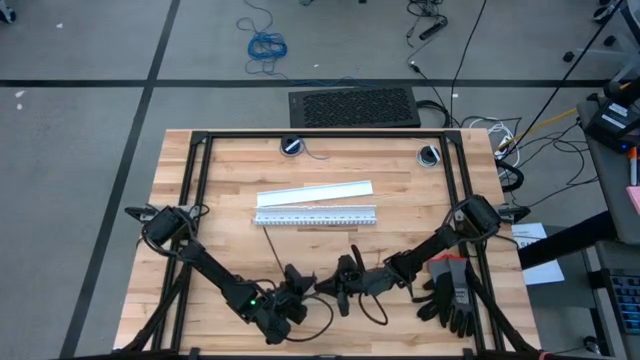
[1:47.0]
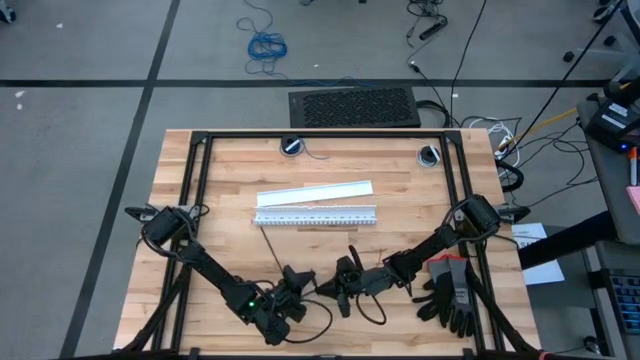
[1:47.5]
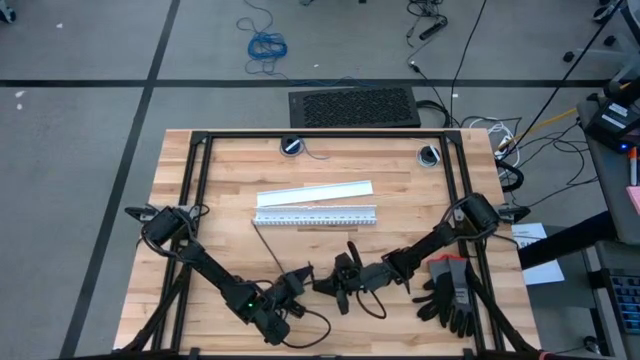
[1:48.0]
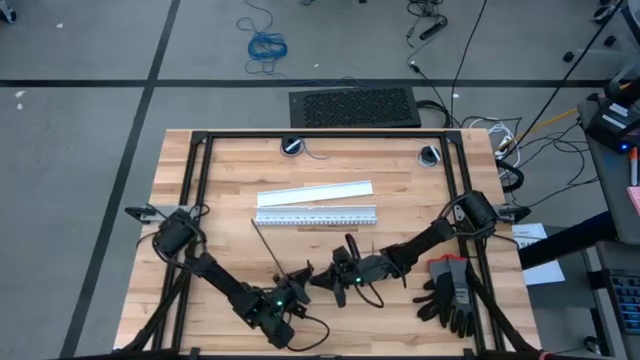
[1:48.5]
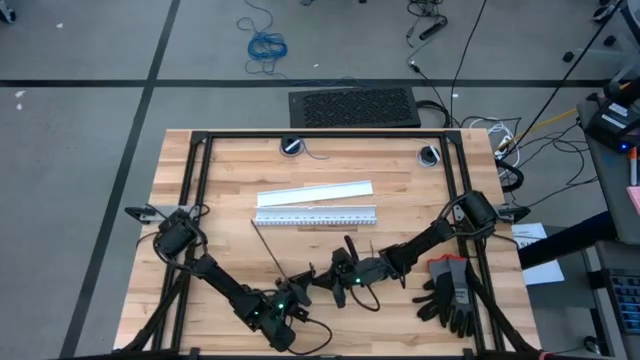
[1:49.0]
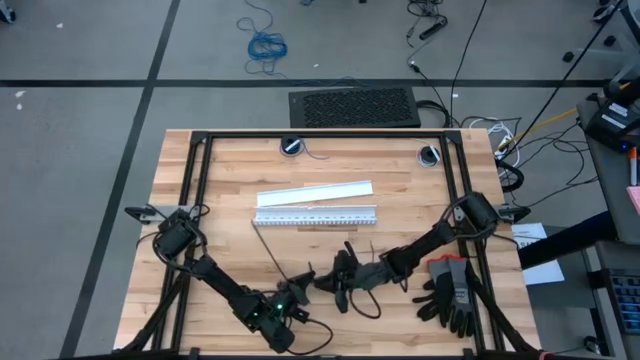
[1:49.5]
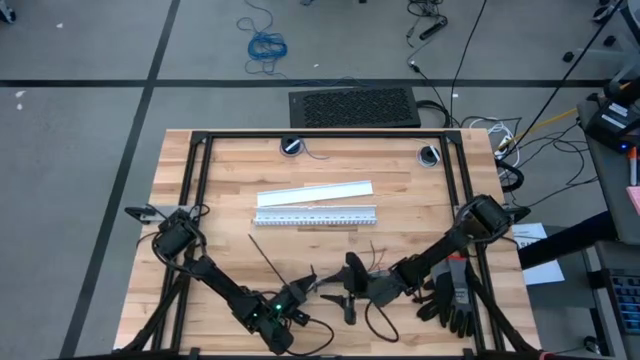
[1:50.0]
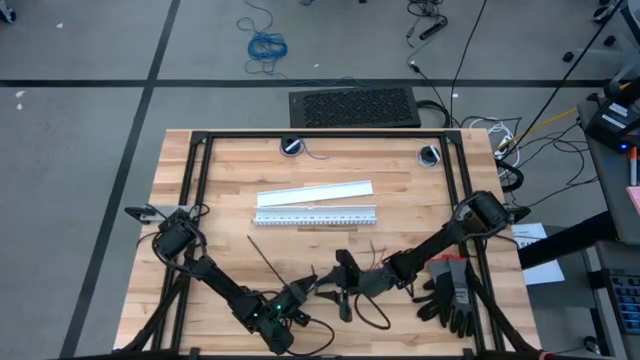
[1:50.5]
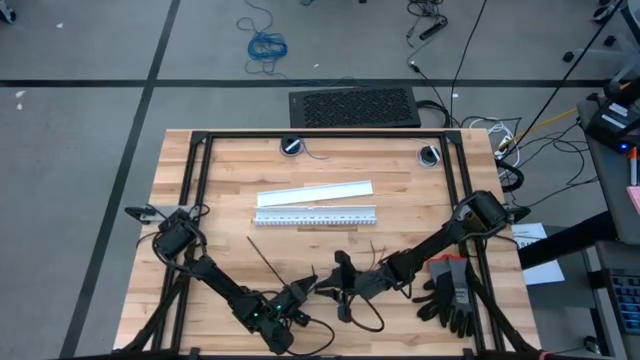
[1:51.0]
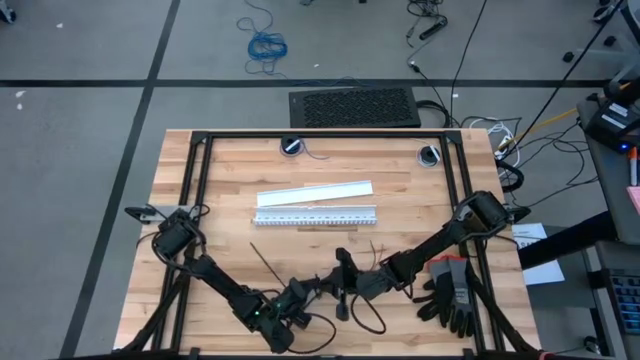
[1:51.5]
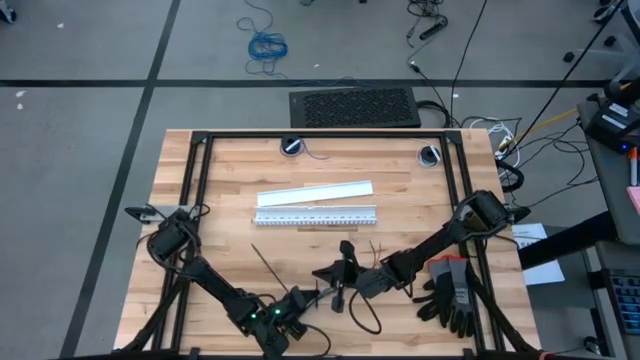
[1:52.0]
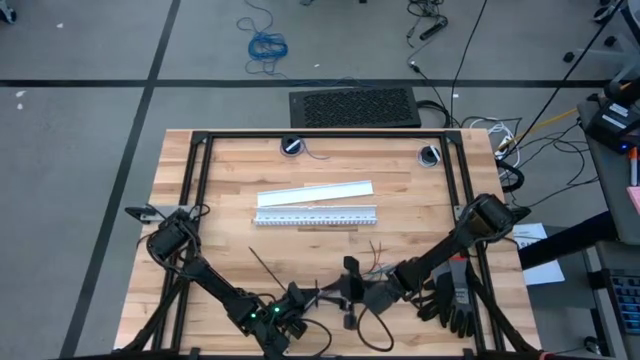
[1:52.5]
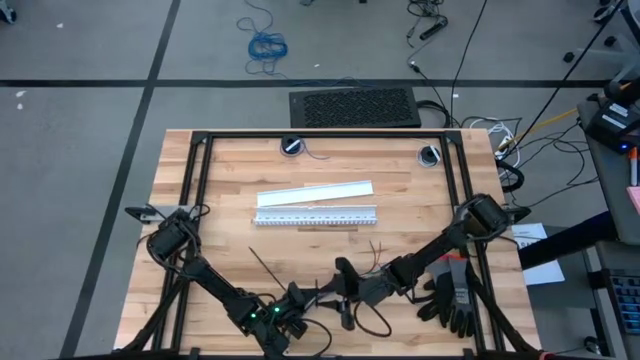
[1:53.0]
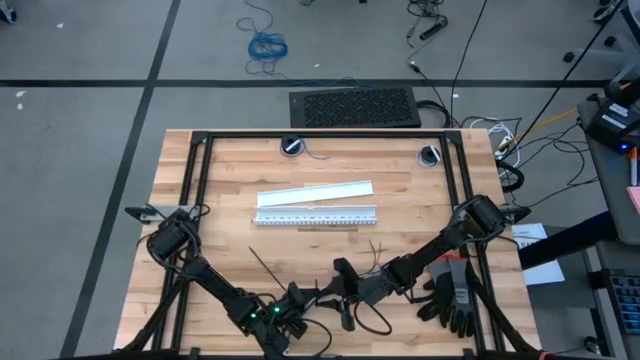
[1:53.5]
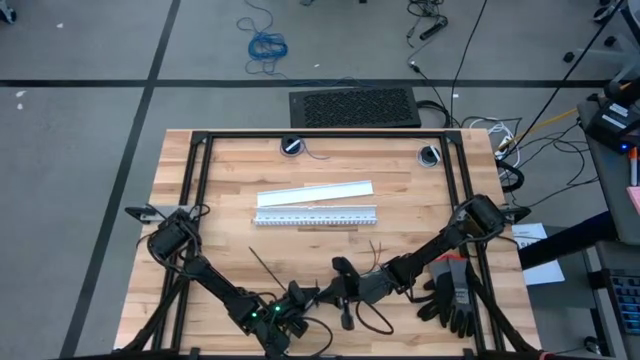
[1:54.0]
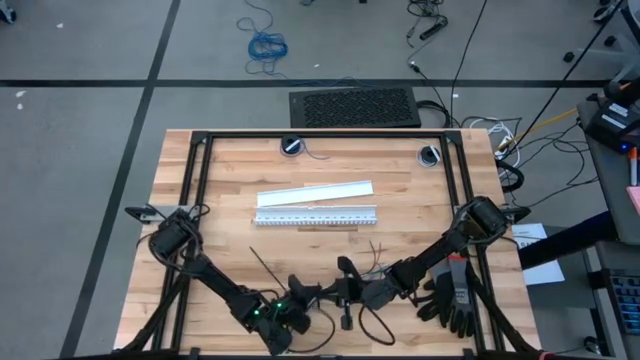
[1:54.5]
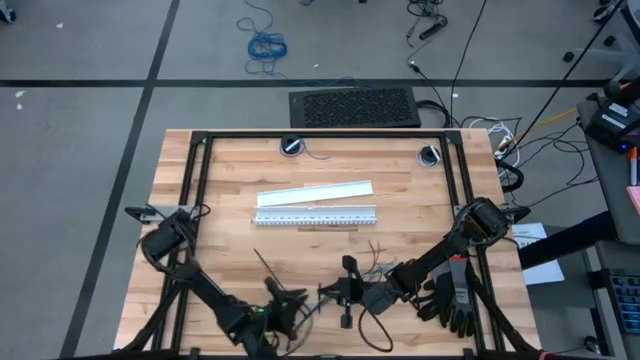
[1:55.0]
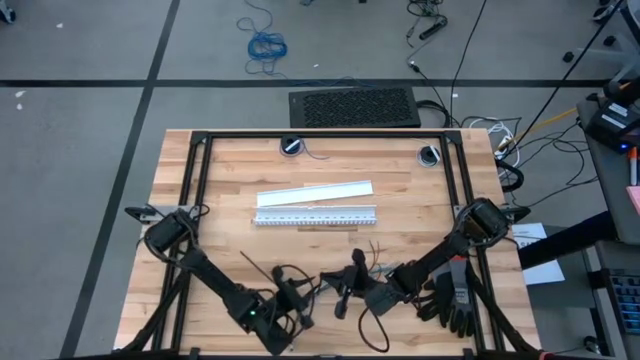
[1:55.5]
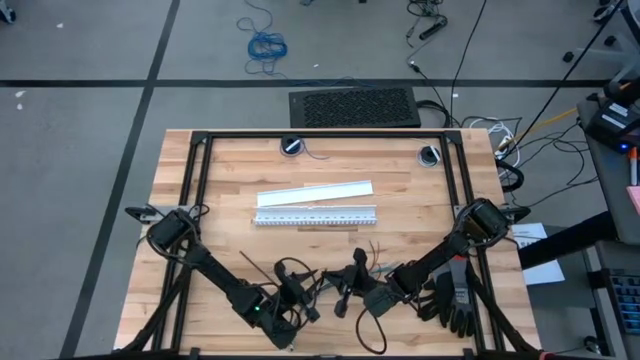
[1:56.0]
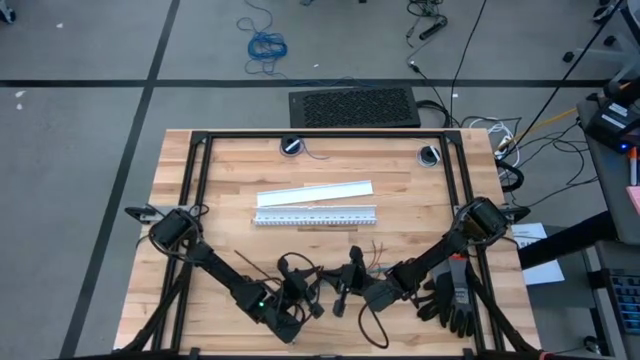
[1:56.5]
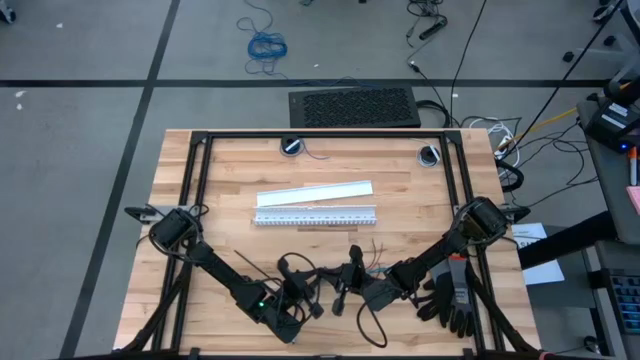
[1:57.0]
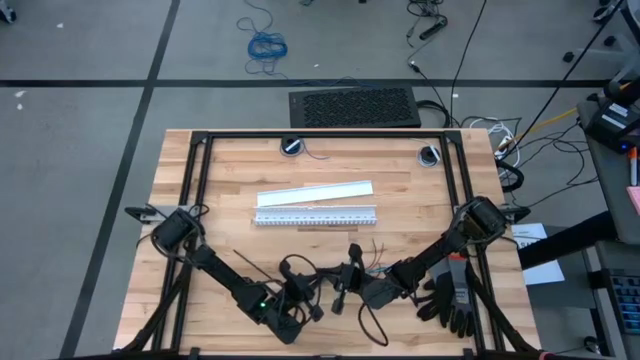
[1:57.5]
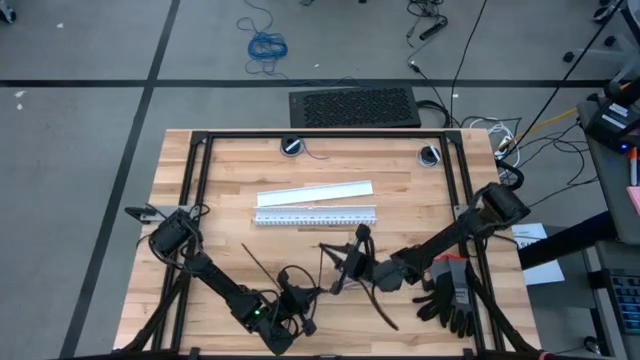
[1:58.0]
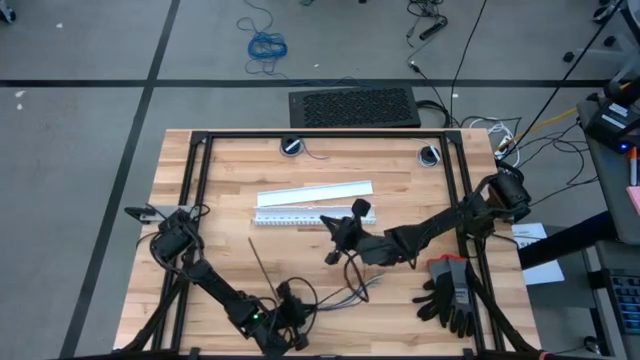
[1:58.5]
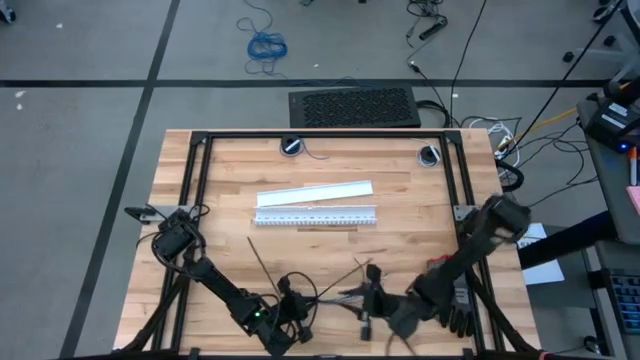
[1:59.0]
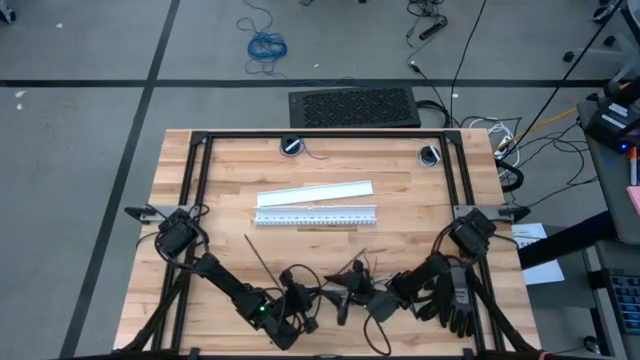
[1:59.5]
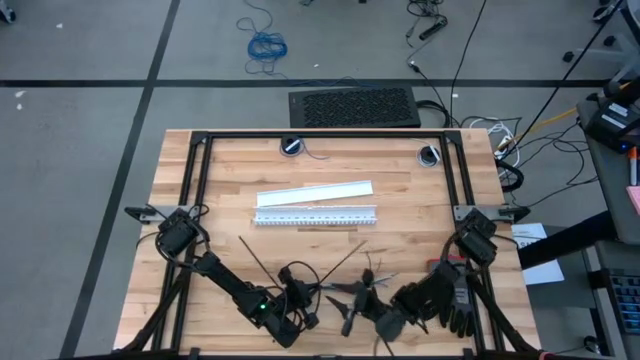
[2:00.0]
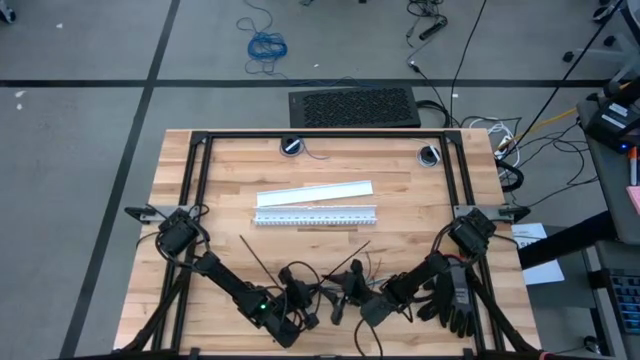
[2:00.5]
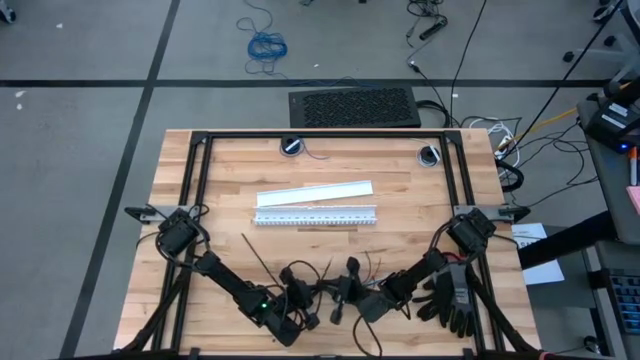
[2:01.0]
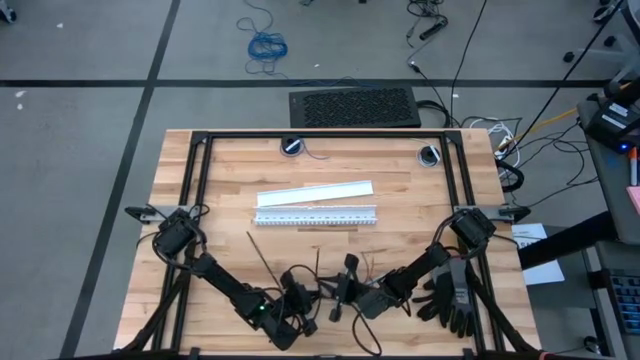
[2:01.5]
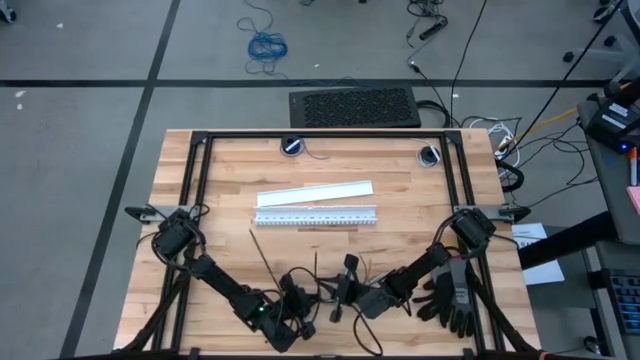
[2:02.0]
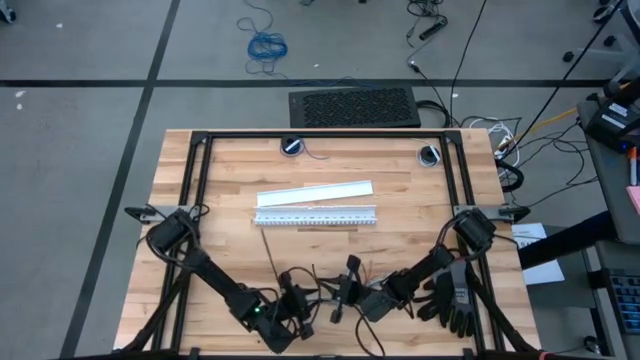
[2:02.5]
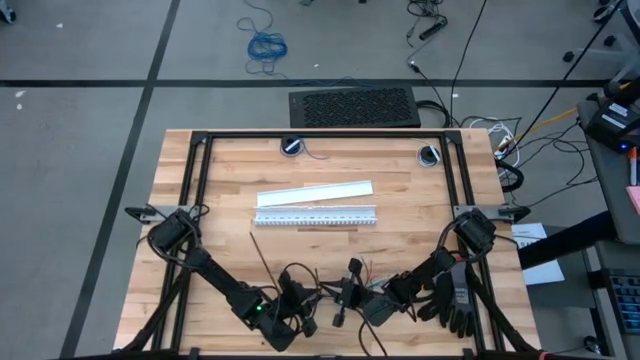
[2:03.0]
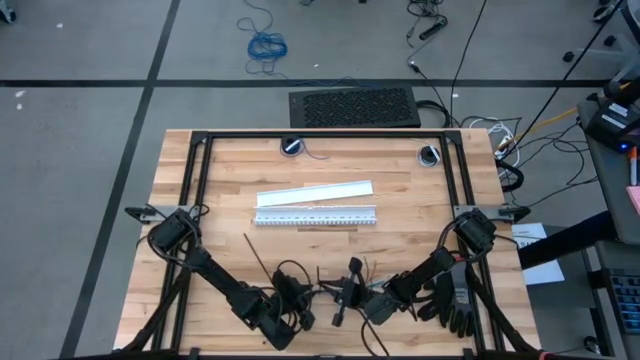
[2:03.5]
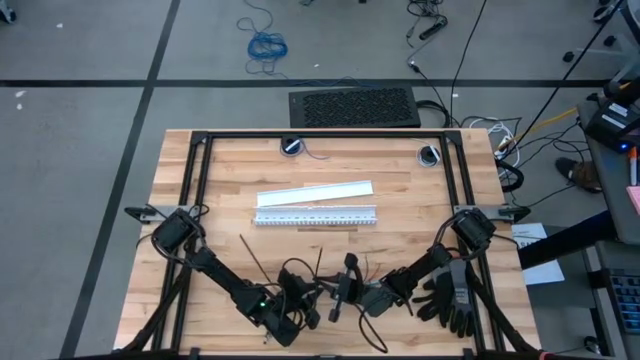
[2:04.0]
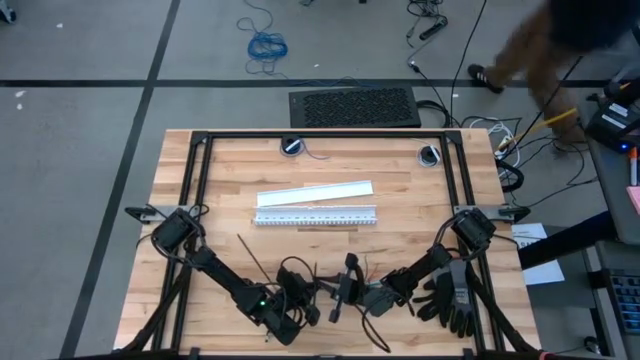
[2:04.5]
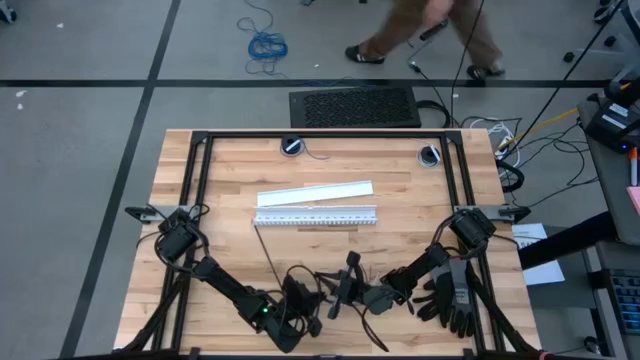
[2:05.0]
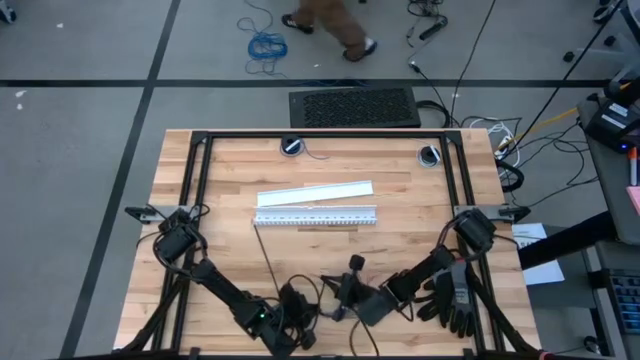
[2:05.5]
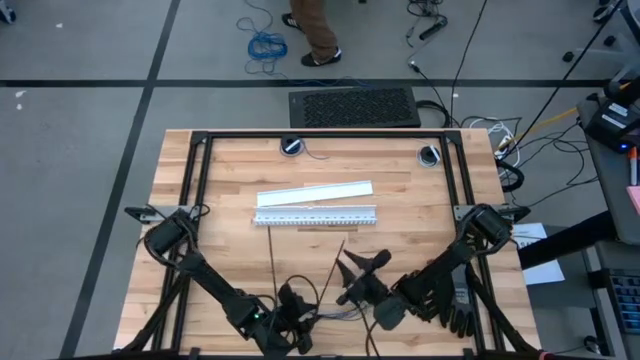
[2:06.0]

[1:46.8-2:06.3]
Task: Ziptie cables
Wrap the black zip tie around the colored cable wires

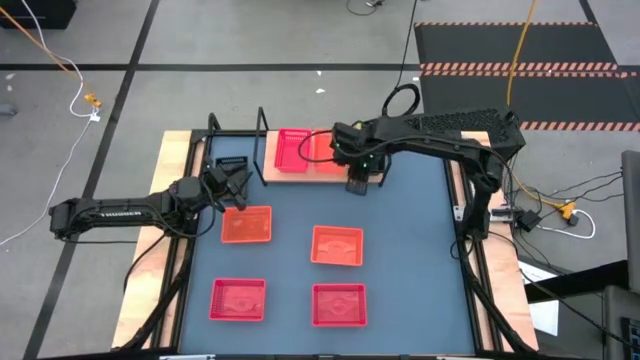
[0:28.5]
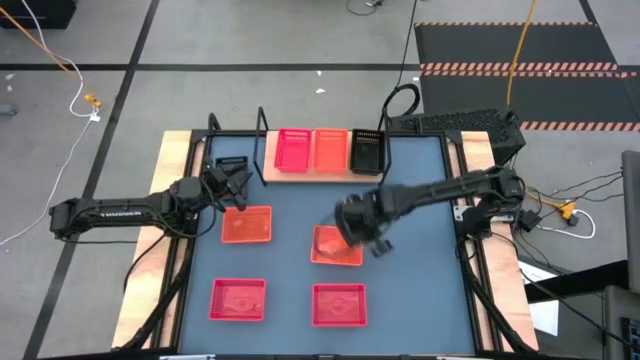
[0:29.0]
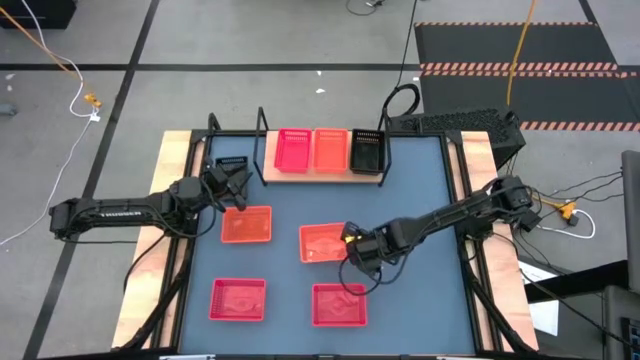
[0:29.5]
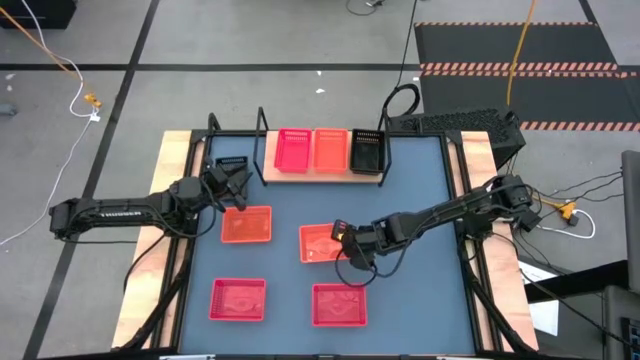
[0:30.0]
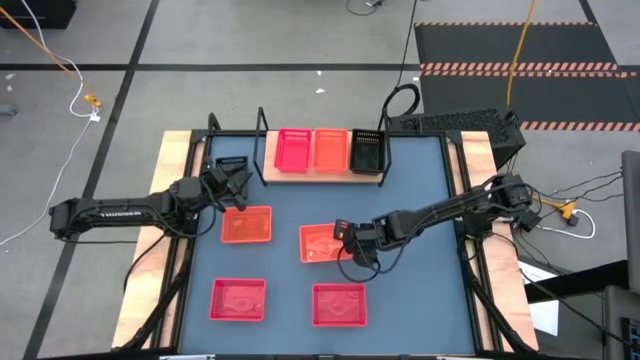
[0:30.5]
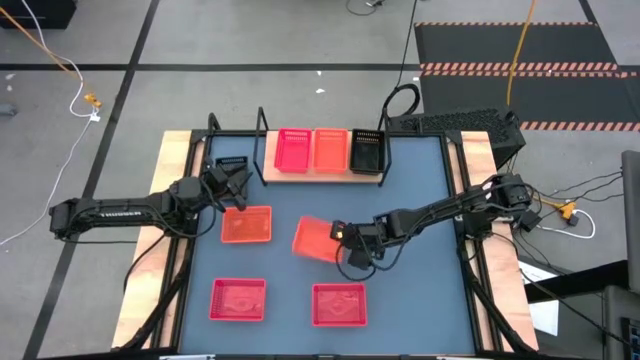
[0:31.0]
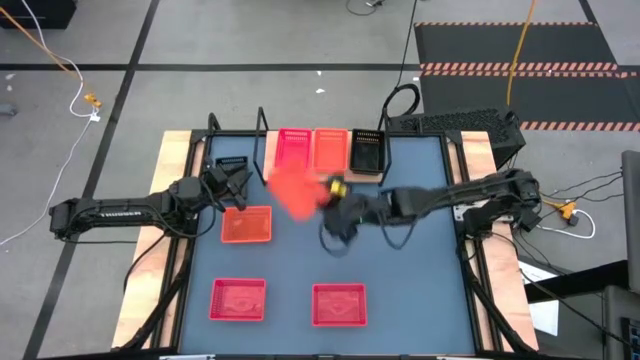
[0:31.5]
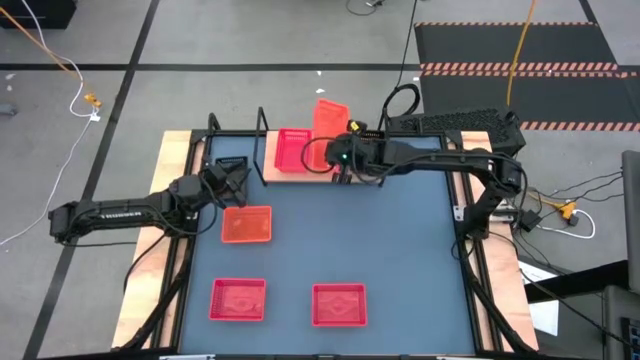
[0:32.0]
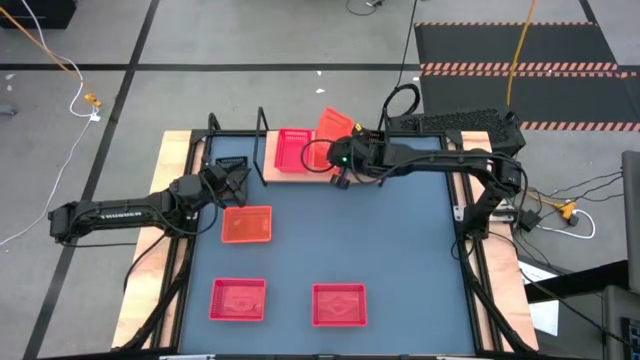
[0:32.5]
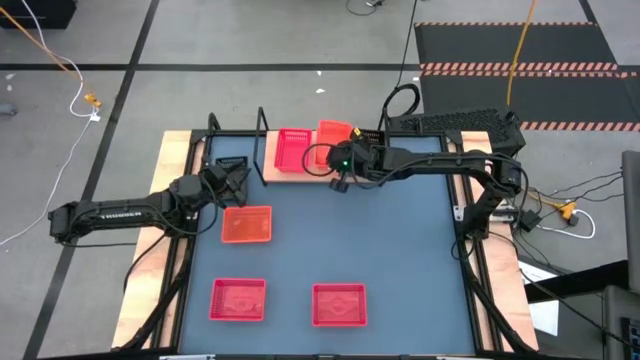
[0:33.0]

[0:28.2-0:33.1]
Task: Stack baskets on shelf by color
Stack the right orange bin on the orange bin on the shelf
